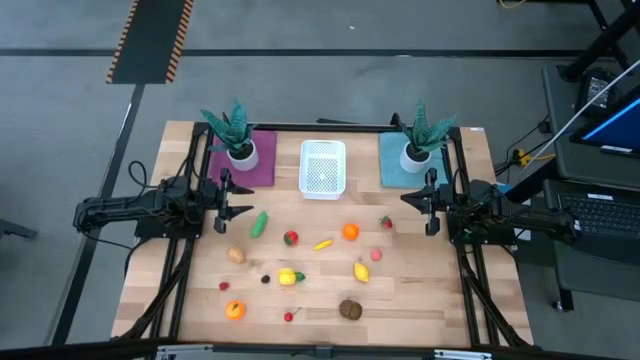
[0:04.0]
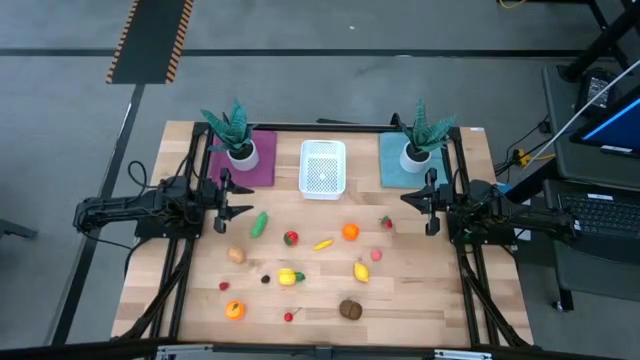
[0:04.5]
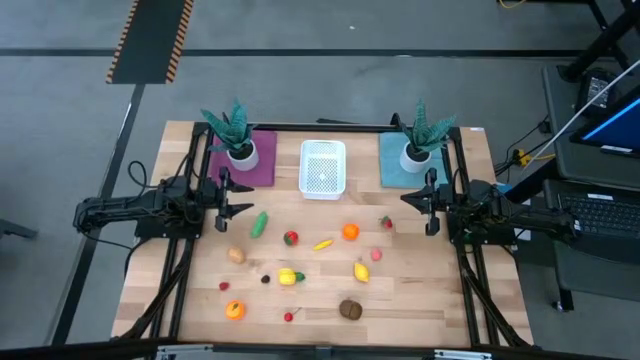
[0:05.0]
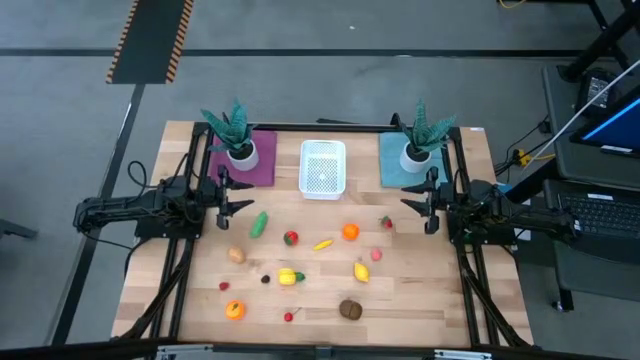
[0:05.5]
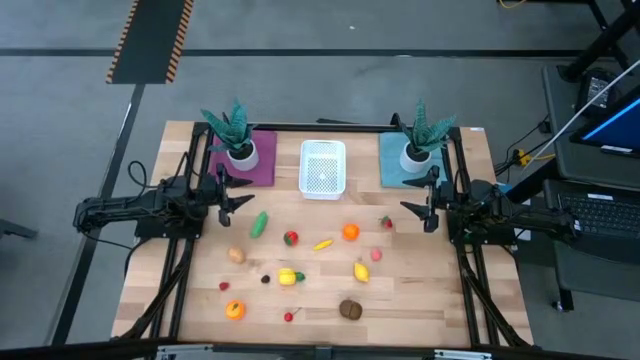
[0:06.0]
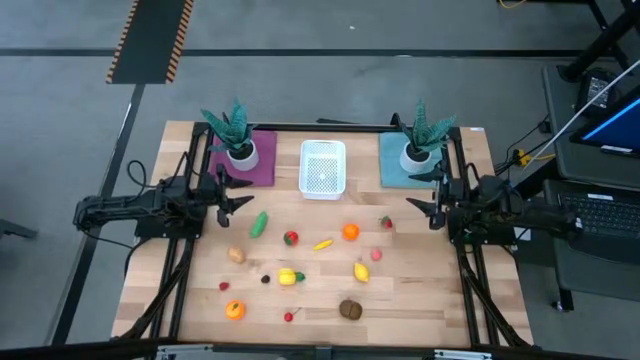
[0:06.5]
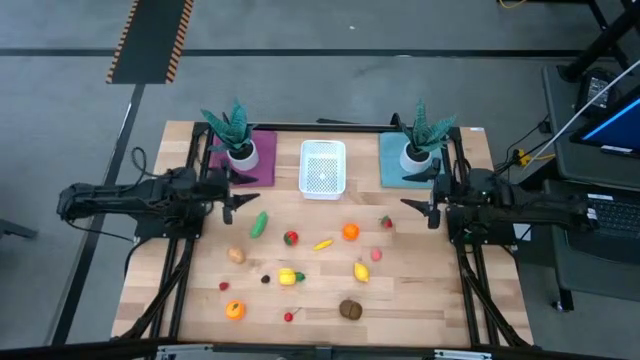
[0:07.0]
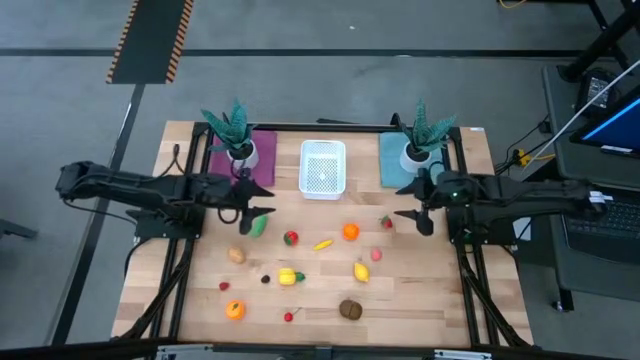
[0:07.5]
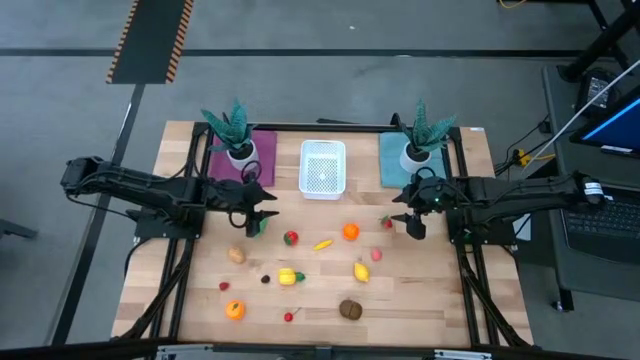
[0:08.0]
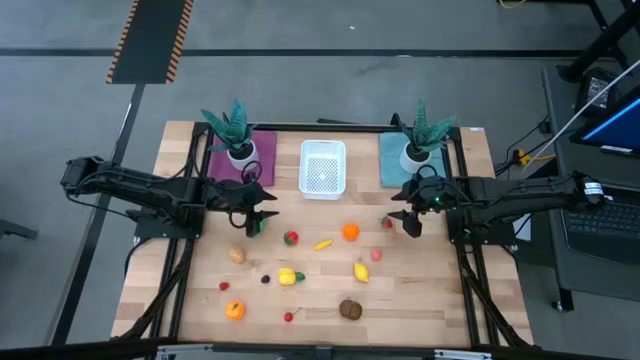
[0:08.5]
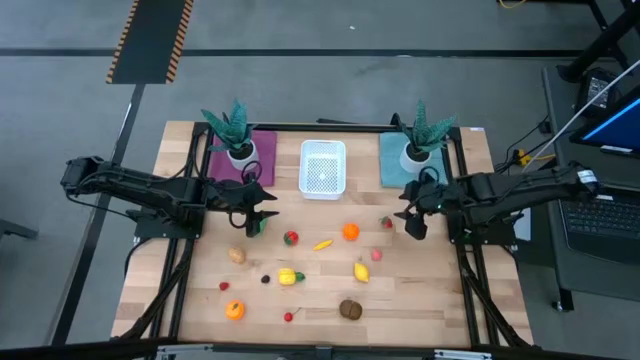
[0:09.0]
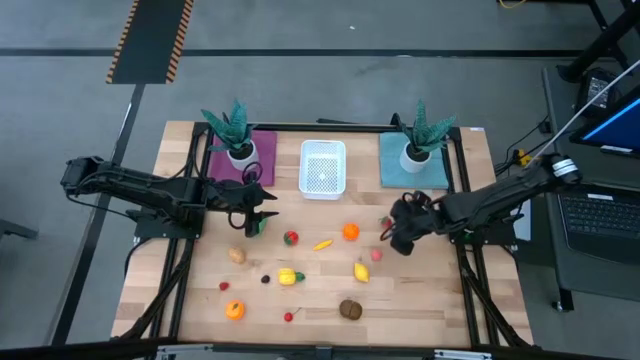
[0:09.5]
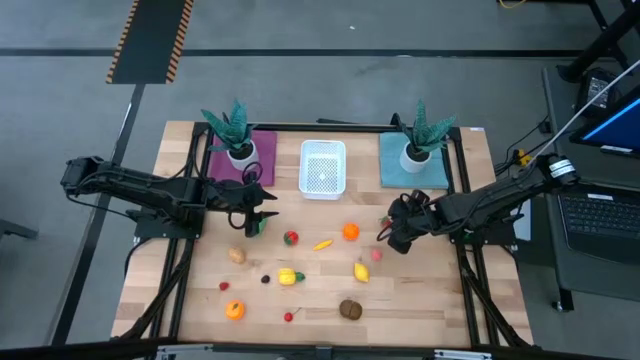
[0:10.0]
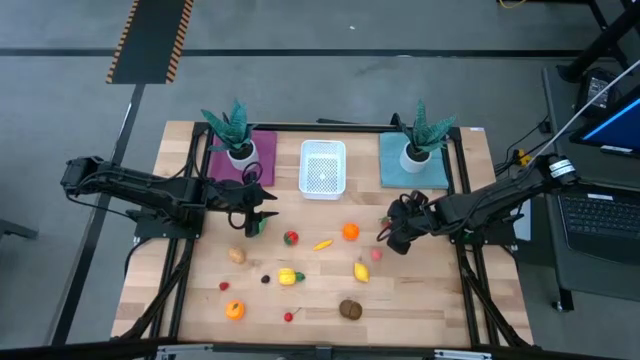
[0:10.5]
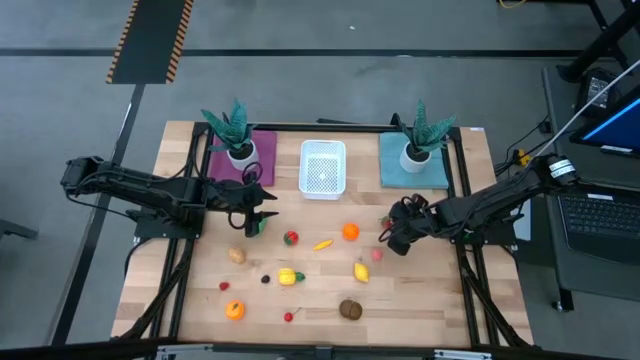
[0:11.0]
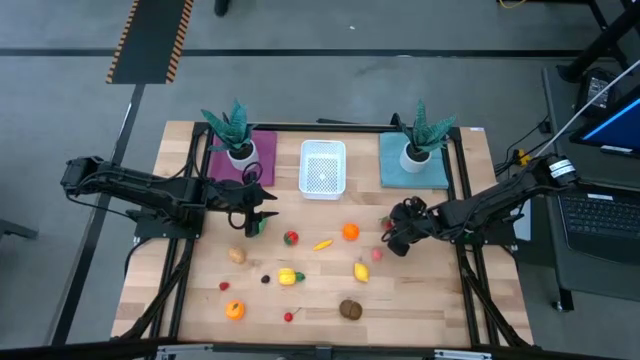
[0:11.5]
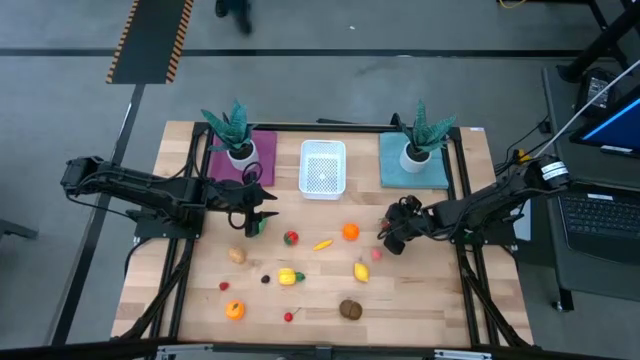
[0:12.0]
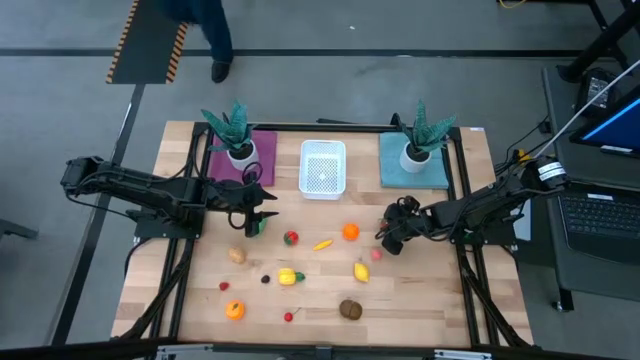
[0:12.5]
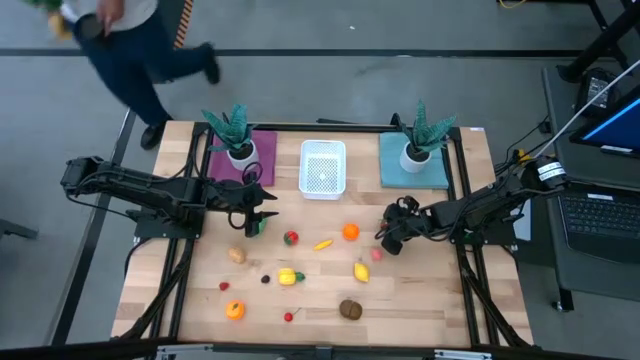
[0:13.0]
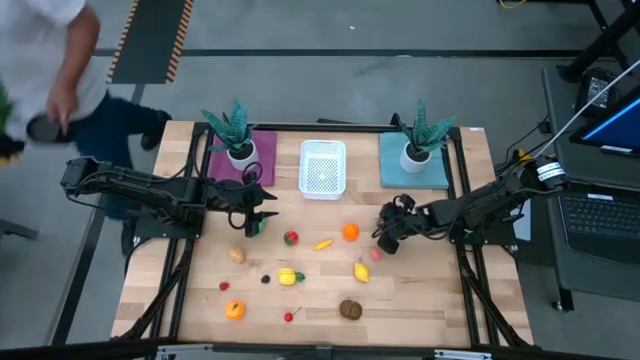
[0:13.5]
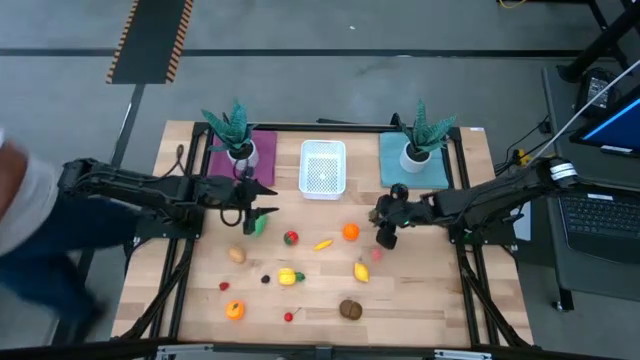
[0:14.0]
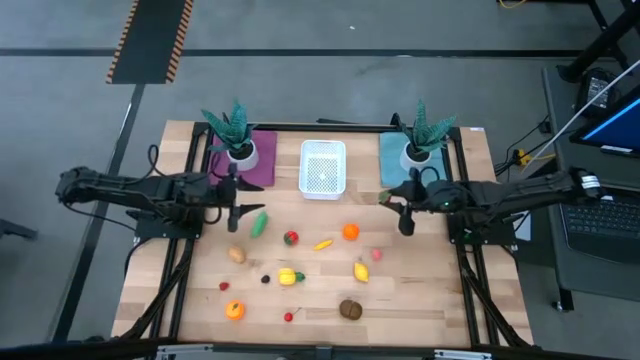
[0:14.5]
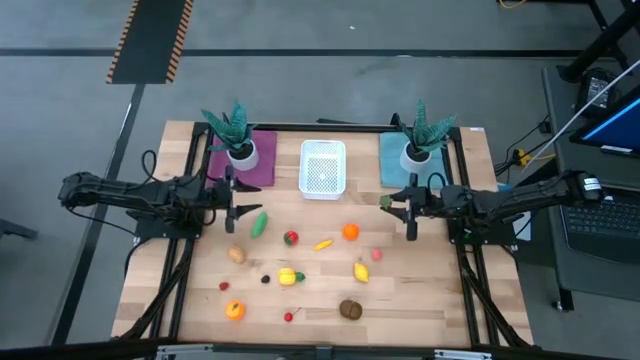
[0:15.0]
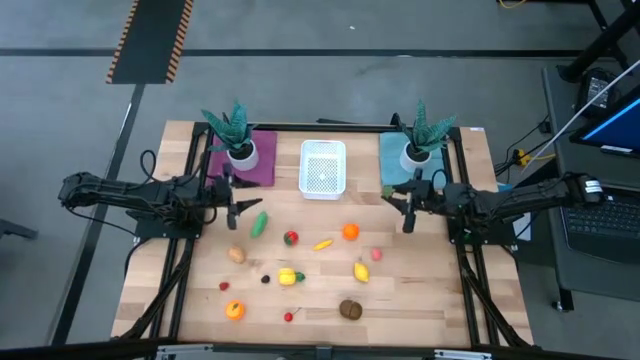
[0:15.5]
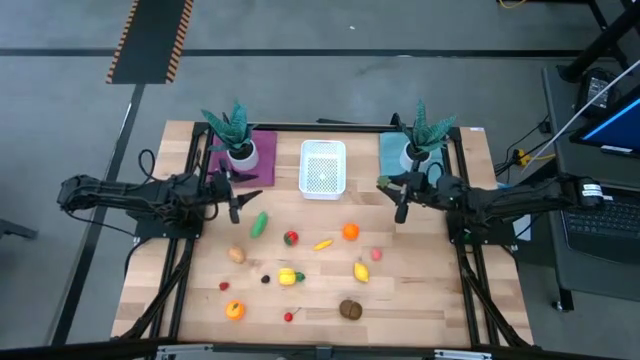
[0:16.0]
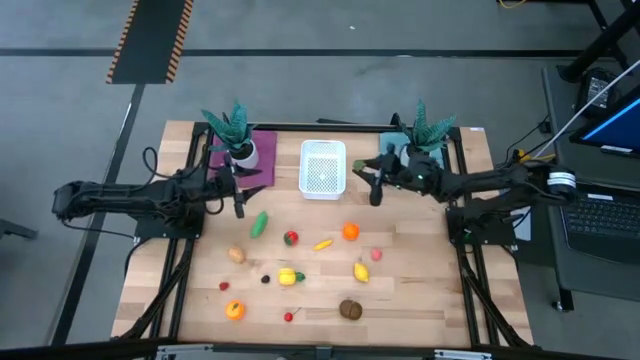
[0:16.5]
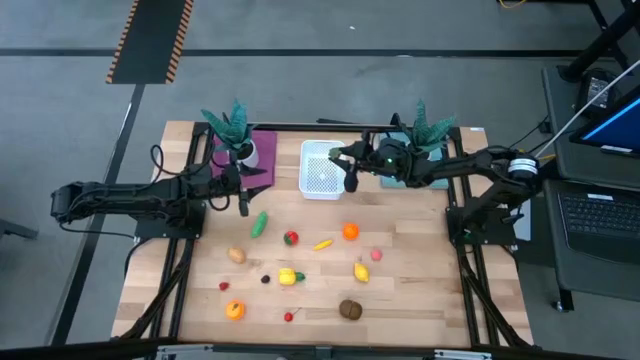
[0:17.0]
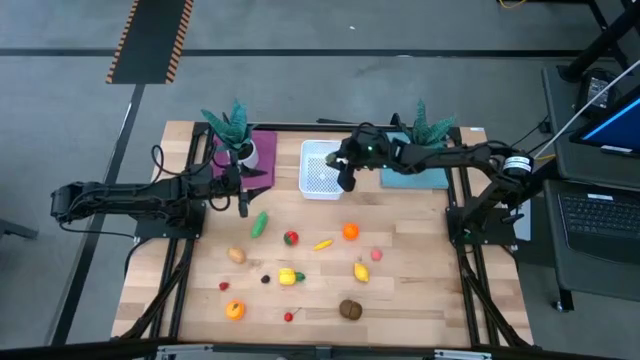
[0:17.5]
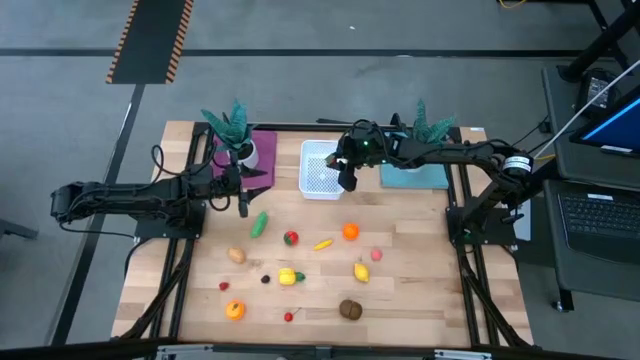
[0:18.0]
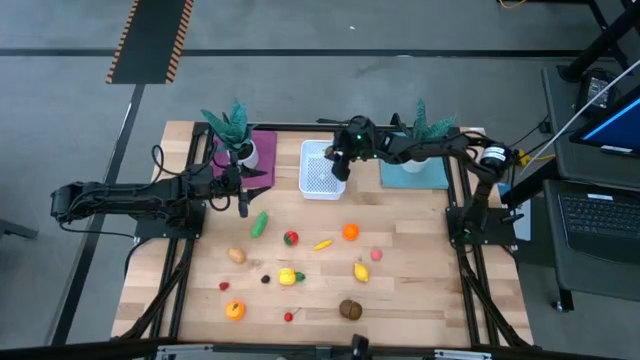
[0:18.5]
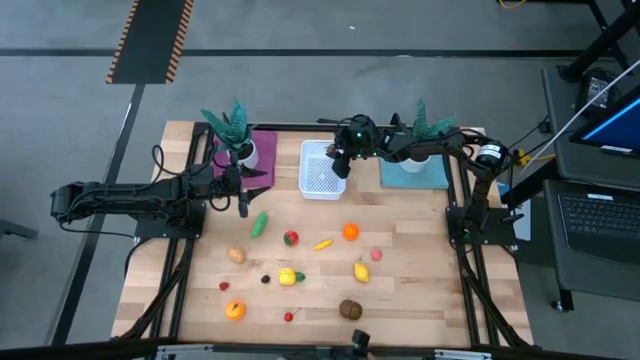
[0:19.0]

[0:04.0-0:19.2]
Task: Pick and placing Produce into tupperware
Put the right red strawberry into the white bin
